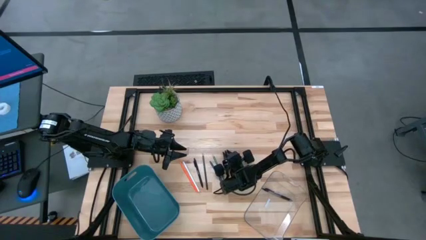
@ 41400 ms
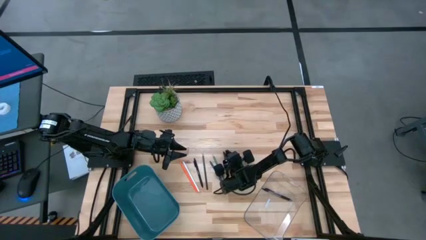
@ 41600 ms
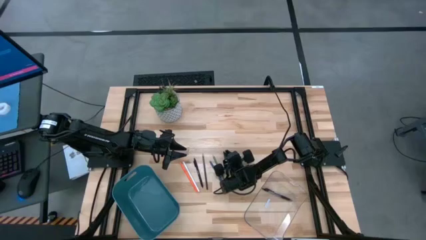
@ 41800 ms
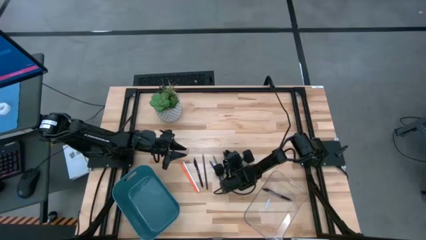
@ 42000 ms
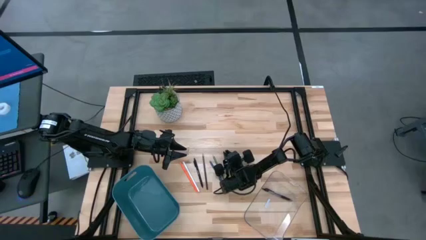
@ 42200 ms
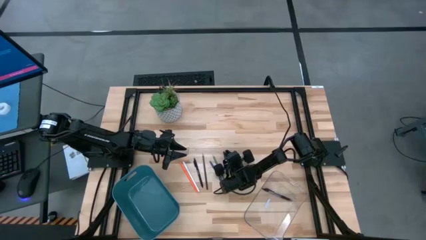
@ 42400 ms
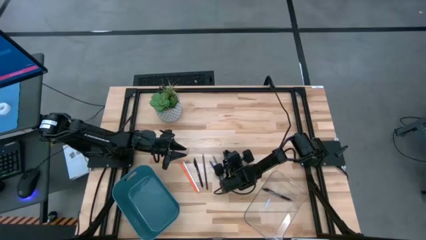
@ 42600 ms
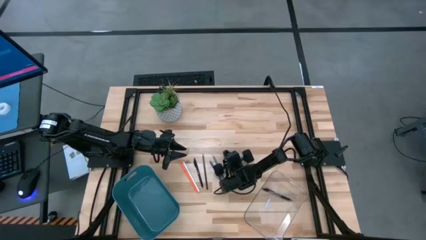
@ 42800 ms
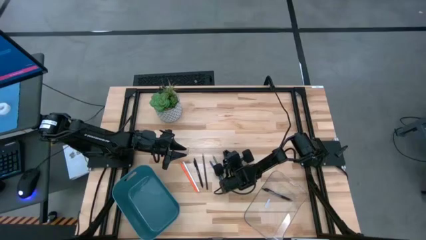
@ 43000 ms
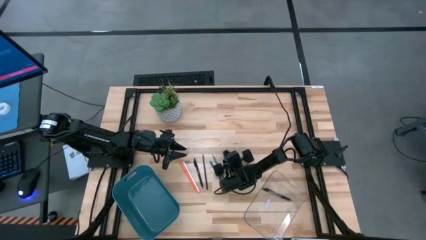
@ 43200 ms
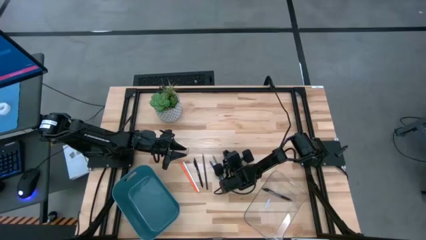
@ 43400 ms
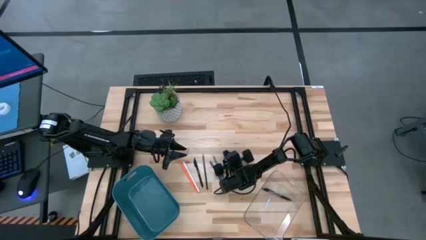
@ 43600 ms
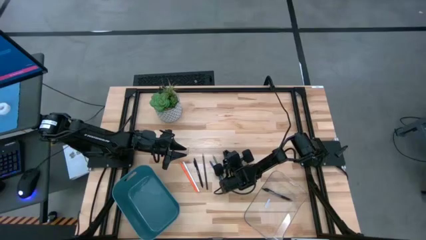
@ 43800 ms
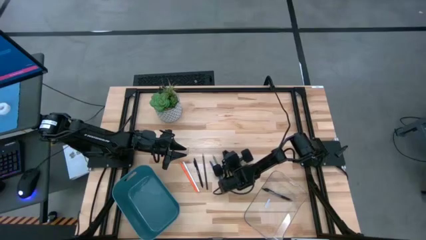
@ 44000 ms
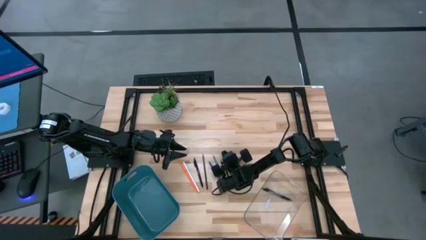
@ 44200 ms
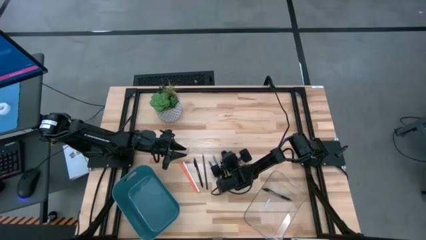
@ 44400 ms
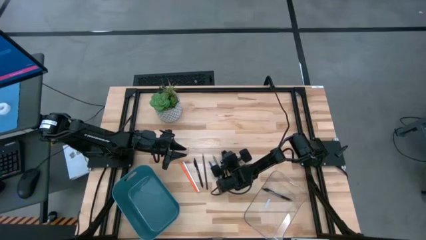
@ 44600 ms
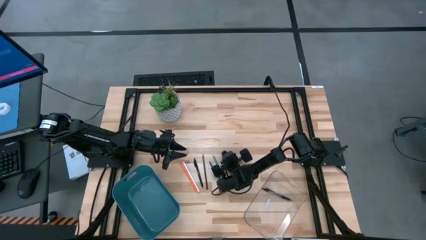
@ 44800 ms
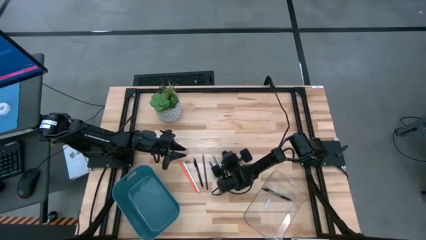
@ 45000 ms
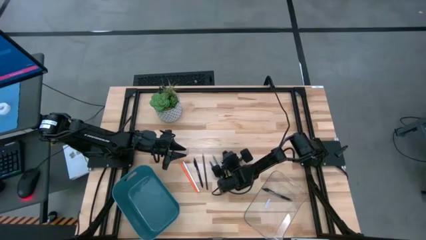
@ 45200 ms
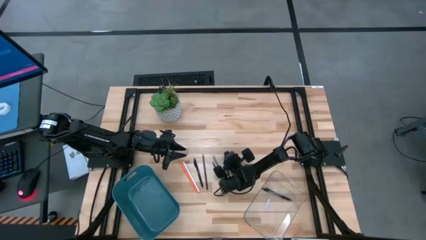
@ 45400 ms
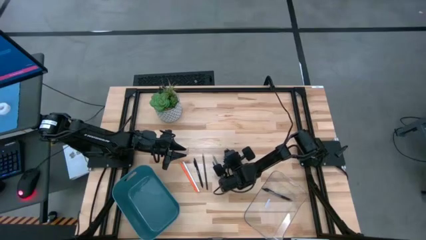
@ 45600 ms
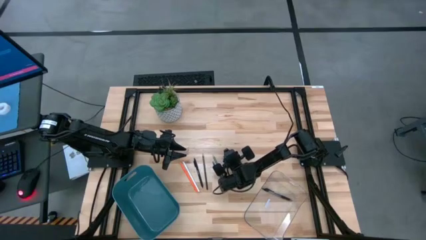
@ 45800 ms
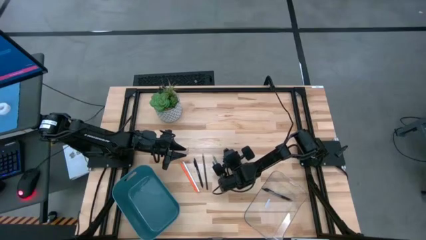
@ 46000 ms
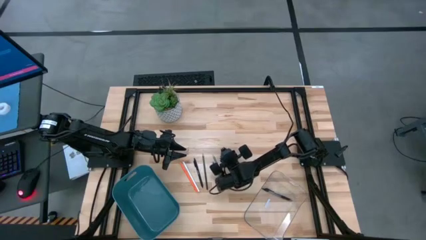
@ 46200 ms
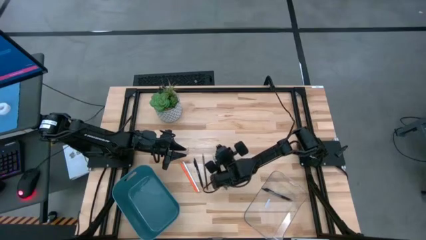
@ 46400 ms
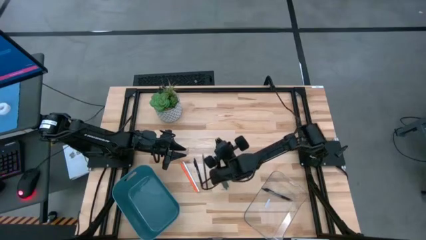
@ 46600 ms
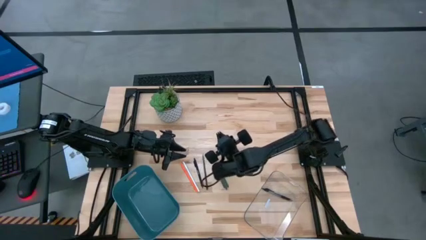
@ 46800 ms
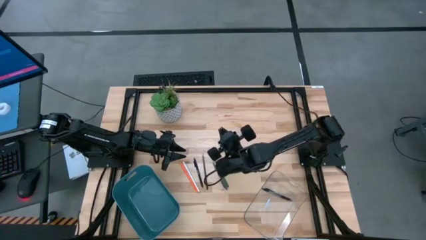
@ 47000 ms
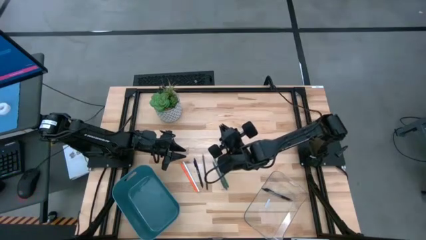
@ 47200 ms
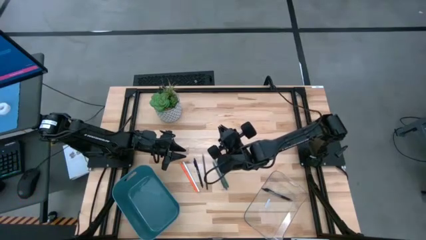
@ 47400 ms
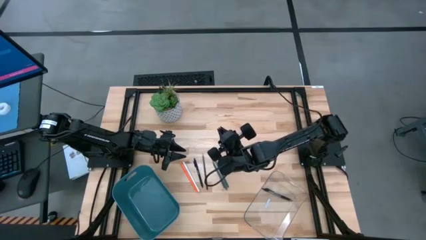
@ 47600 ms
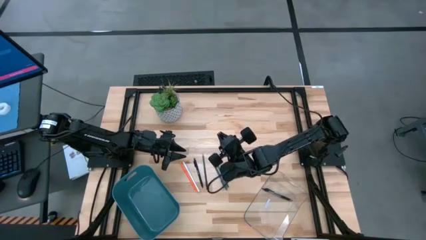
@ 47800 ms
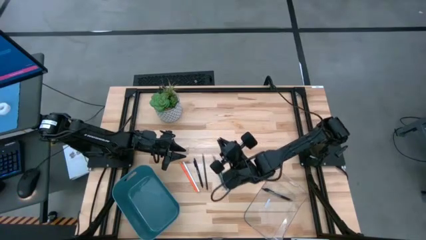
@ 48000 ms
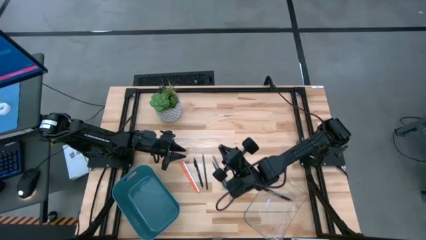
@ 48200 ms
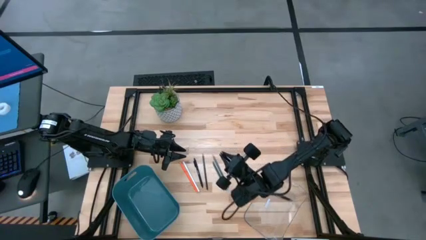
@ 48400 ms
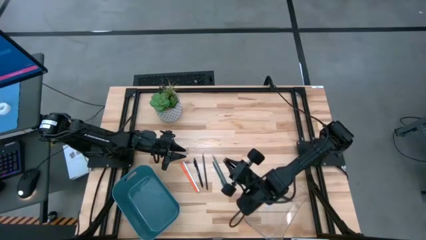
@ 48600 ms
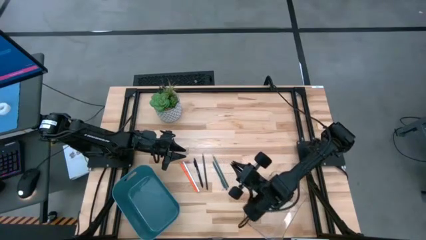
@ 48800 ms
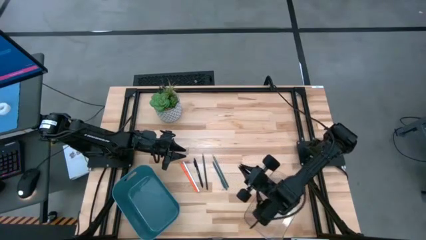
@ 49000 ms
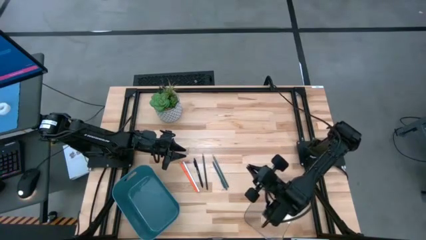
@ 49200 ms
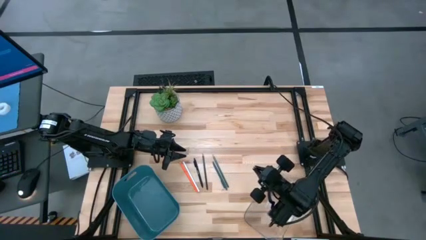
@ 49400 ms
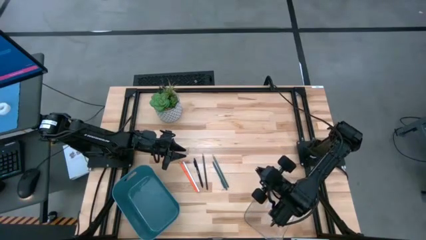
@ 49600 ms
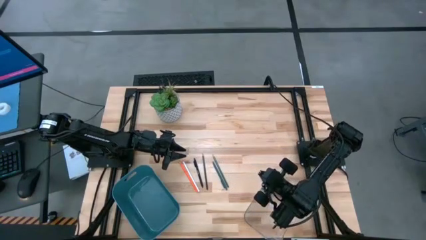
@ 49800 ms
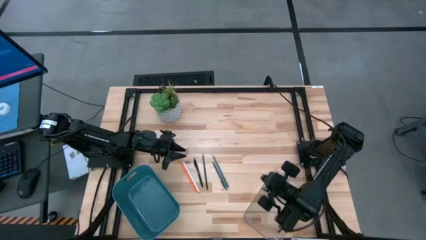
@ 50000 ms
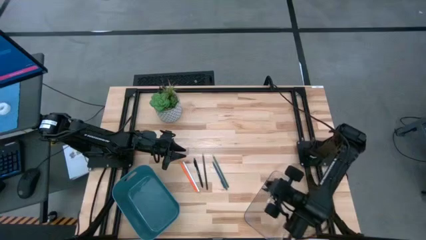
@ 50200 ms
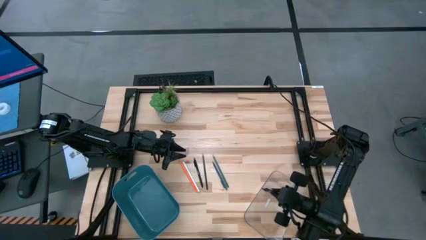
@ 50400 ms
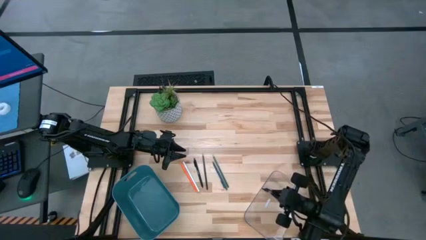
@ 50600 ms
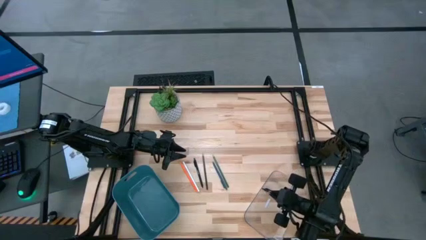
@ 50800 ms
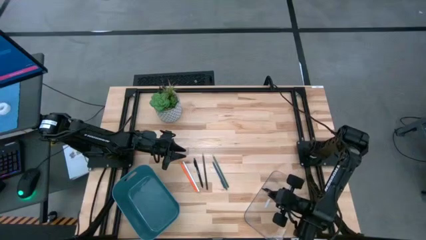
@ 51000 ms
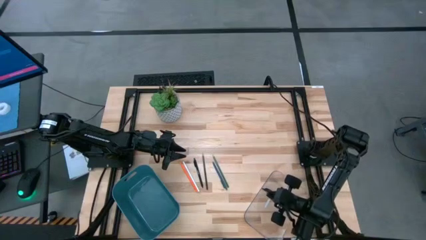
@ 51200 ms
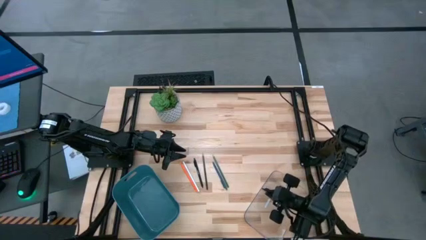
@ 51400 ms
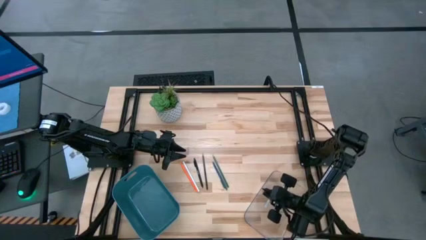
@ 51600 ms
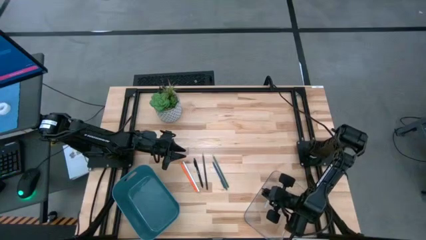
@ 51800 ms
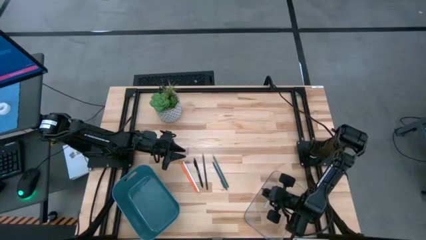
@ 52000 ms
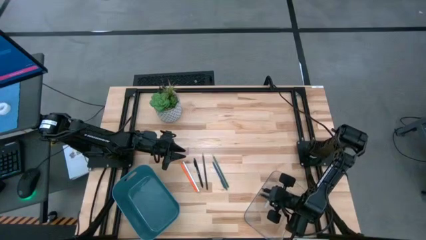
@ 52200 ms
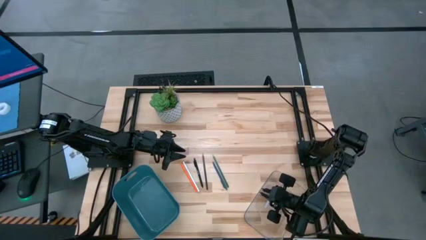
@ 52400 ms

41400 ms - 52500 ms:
Task: Sort pens & pencils
Put the right black pen into the transparent bin
